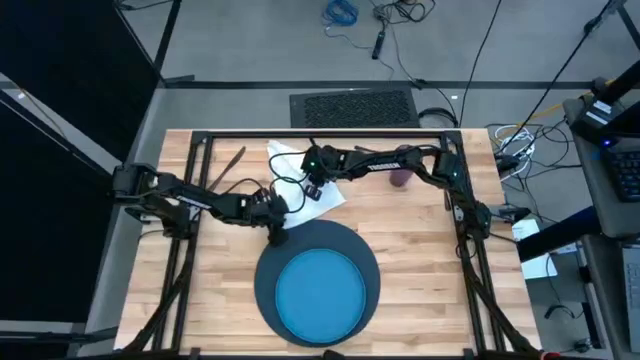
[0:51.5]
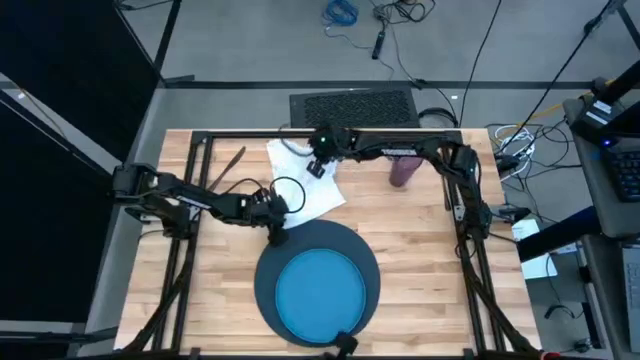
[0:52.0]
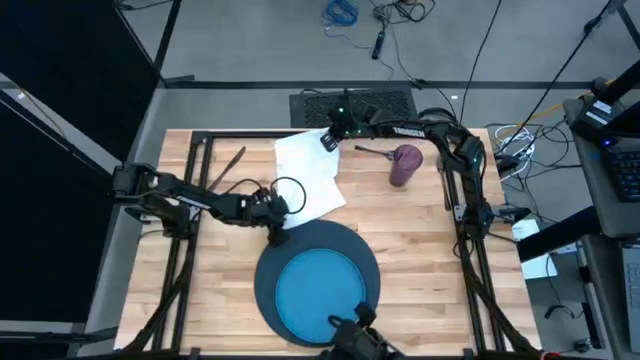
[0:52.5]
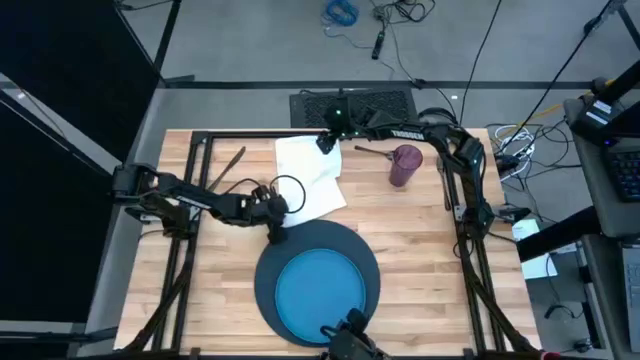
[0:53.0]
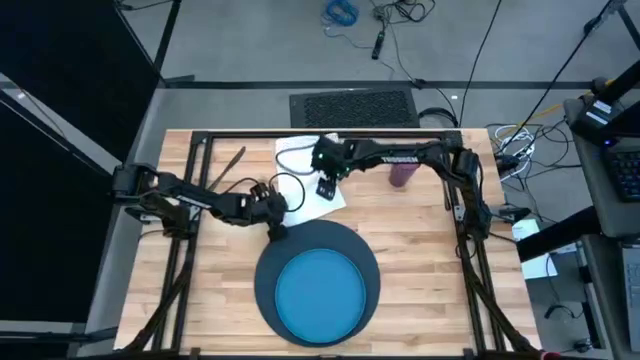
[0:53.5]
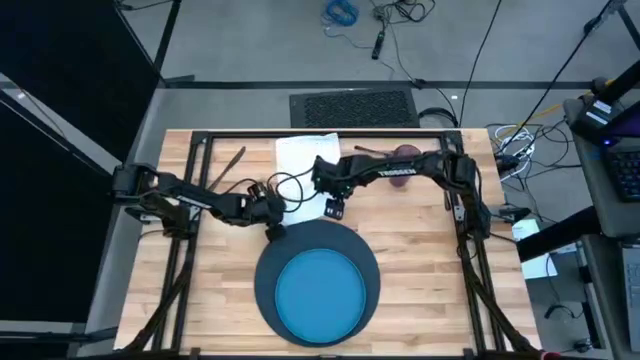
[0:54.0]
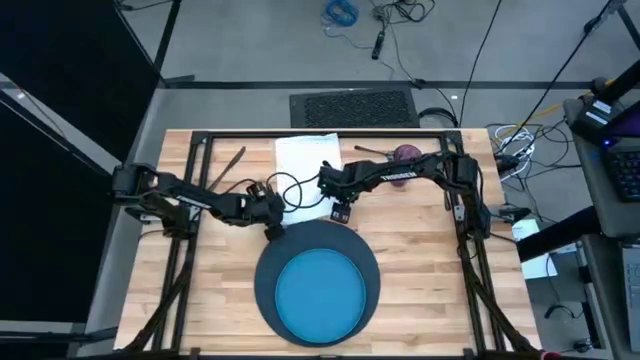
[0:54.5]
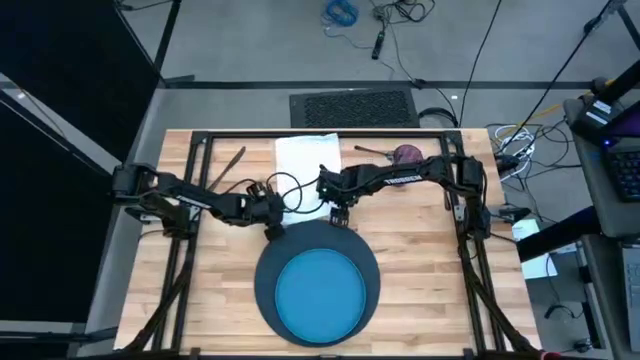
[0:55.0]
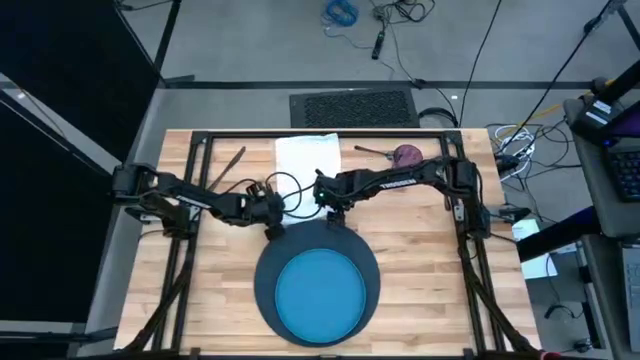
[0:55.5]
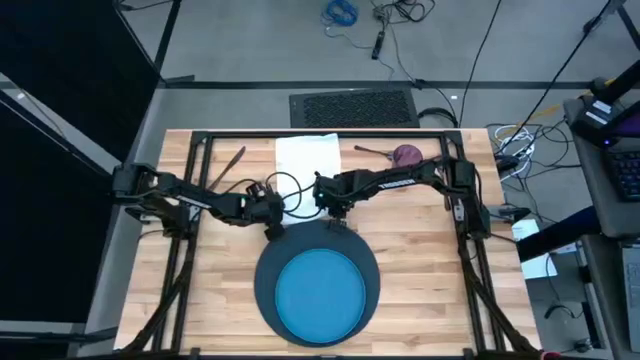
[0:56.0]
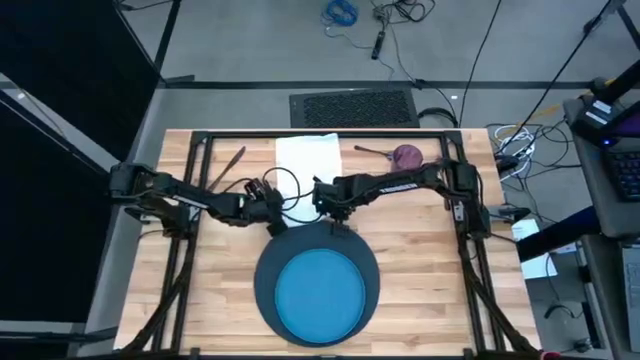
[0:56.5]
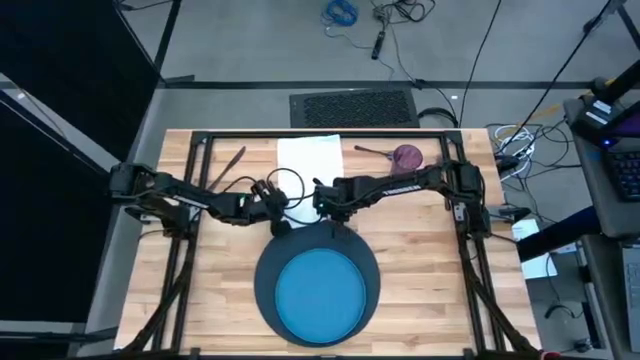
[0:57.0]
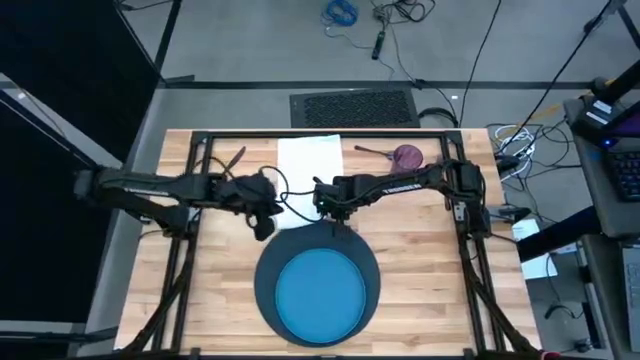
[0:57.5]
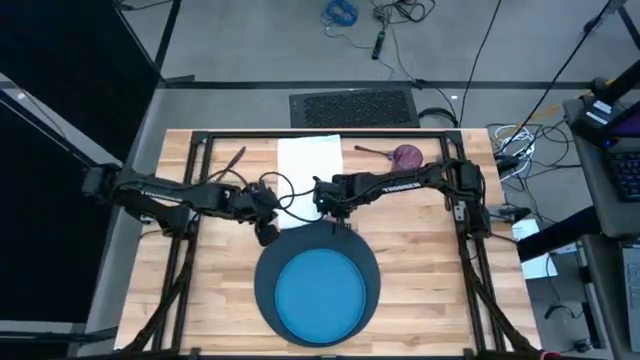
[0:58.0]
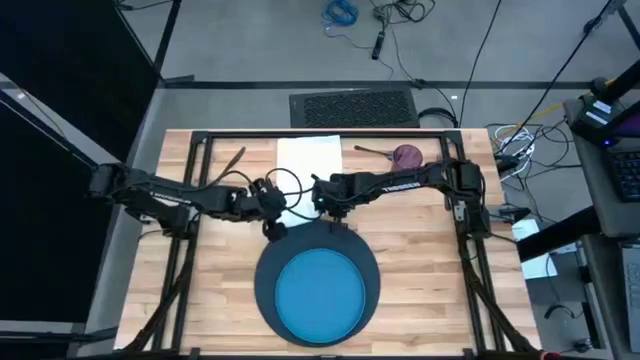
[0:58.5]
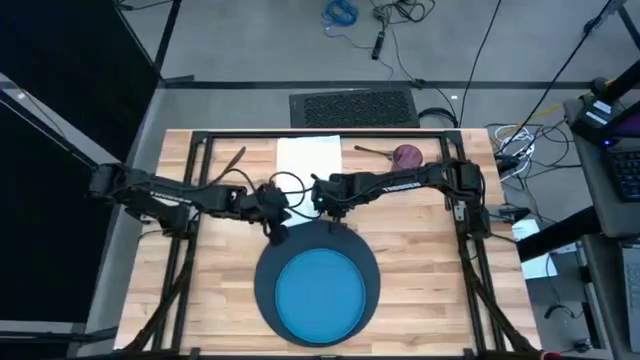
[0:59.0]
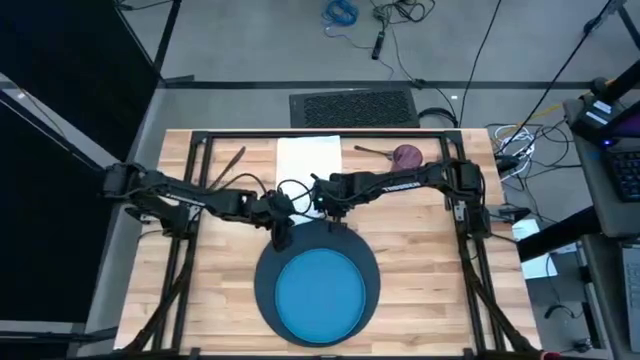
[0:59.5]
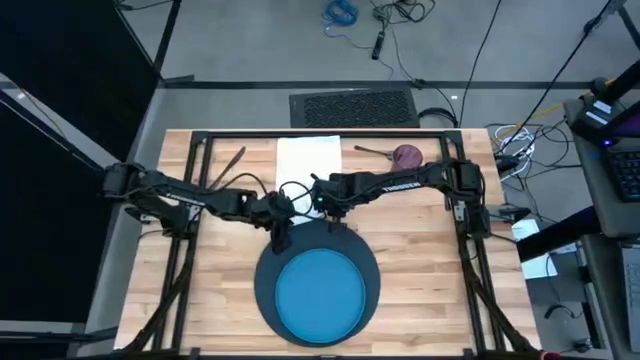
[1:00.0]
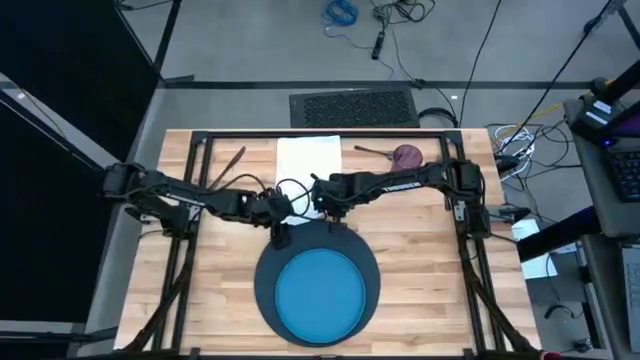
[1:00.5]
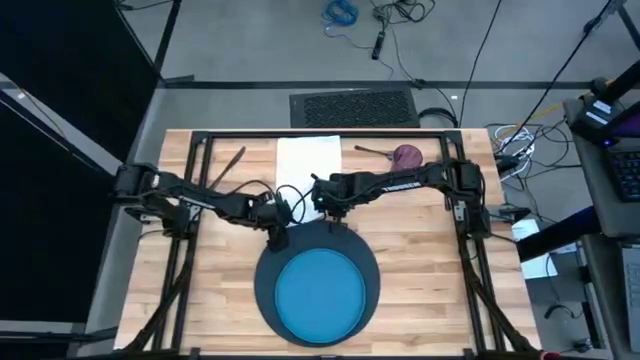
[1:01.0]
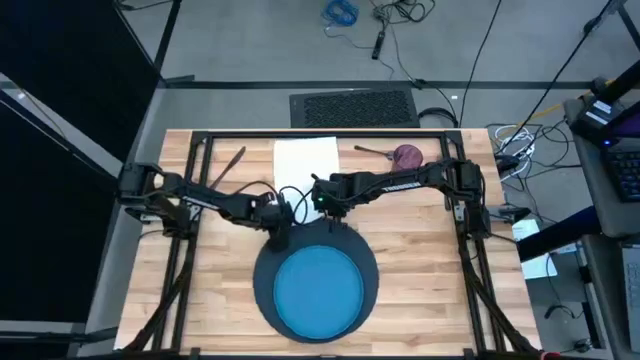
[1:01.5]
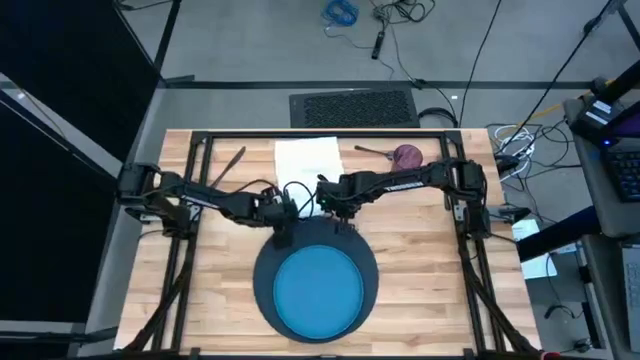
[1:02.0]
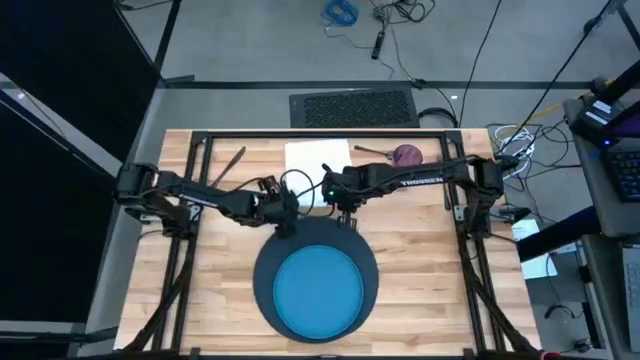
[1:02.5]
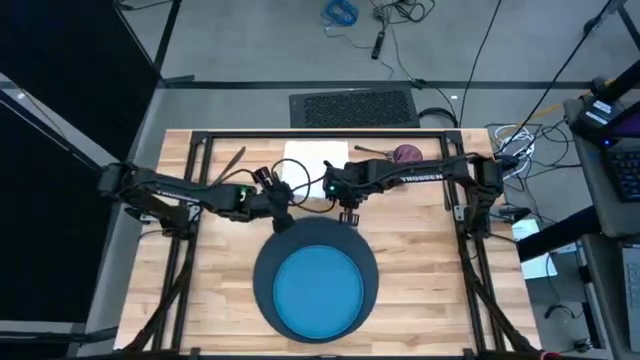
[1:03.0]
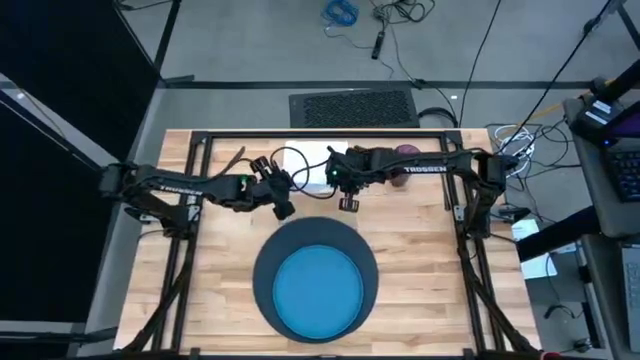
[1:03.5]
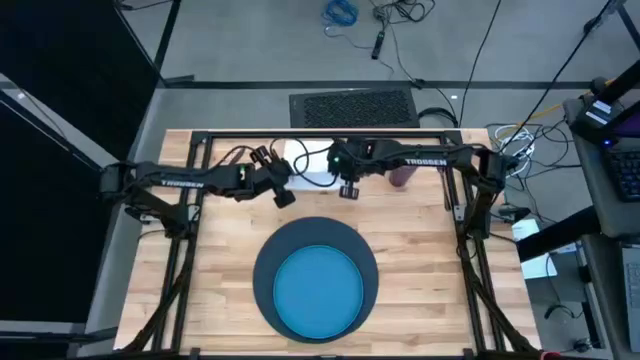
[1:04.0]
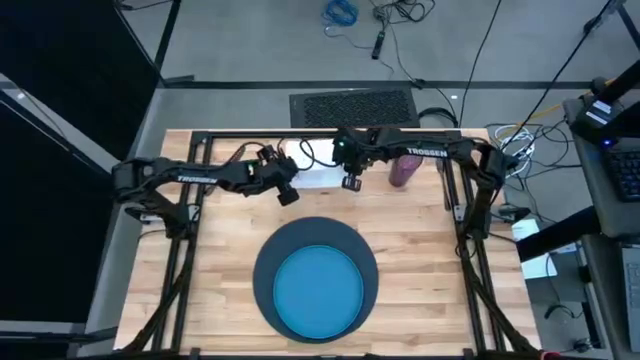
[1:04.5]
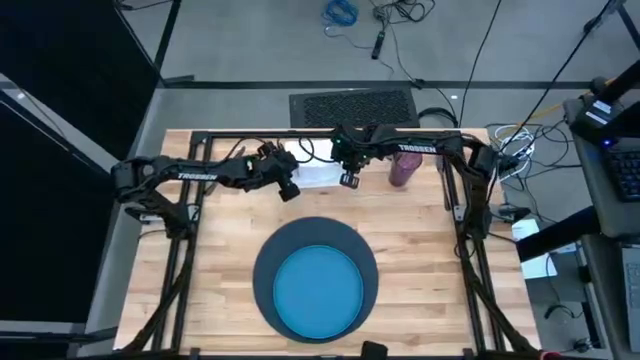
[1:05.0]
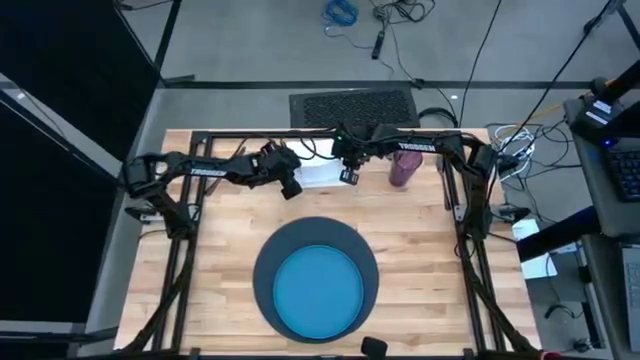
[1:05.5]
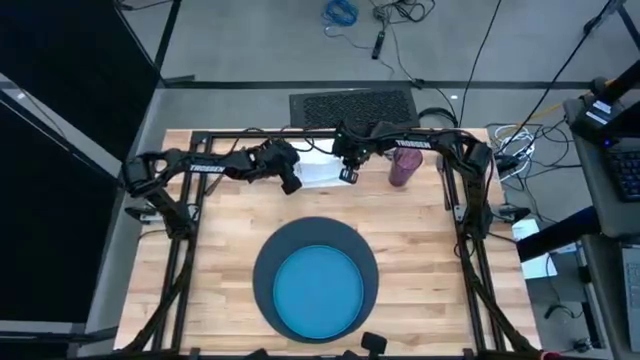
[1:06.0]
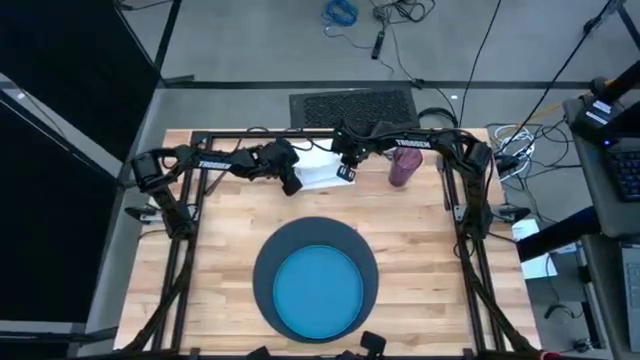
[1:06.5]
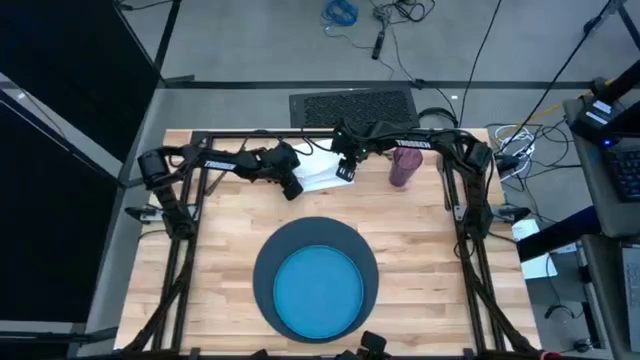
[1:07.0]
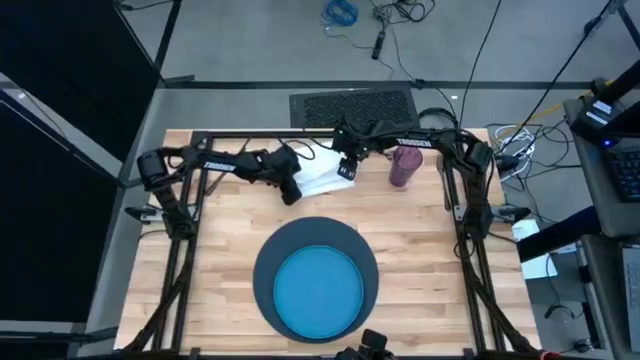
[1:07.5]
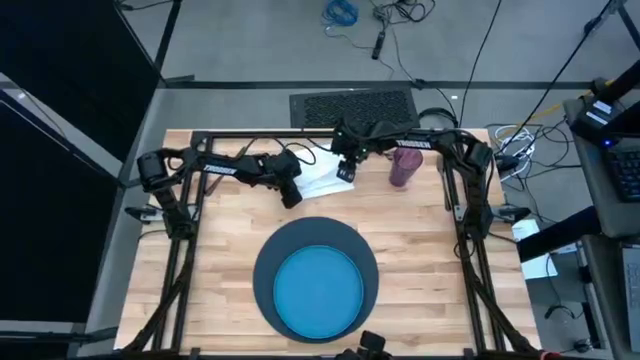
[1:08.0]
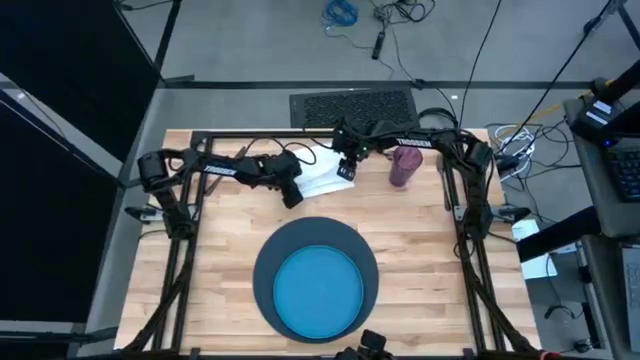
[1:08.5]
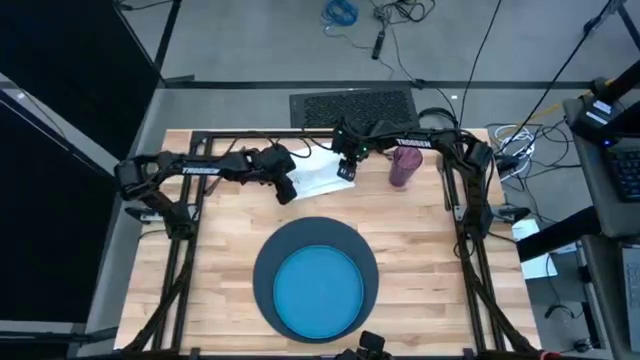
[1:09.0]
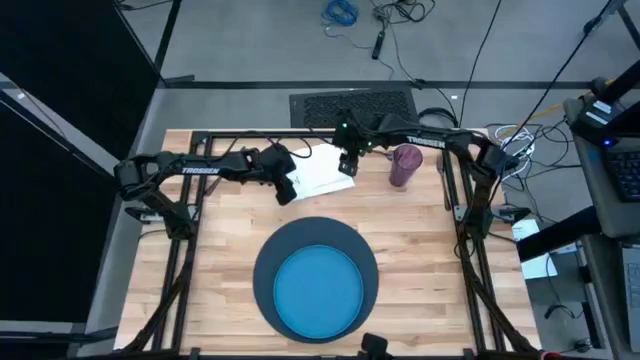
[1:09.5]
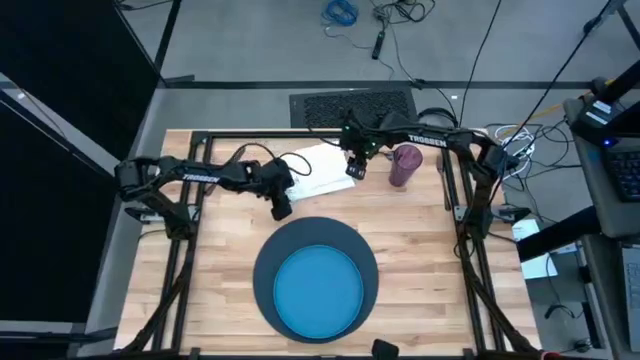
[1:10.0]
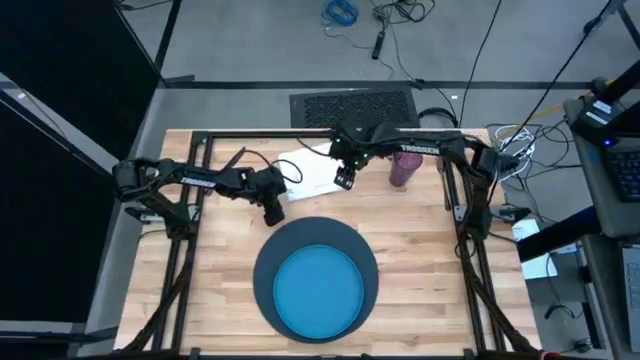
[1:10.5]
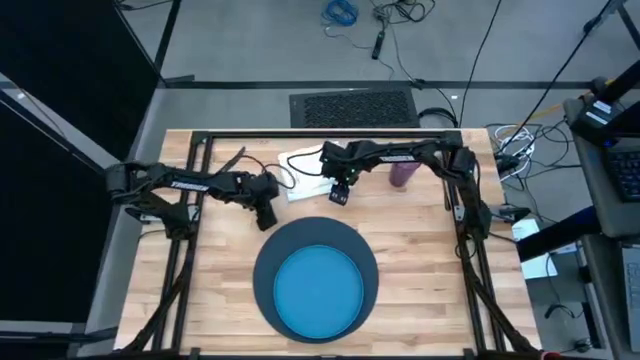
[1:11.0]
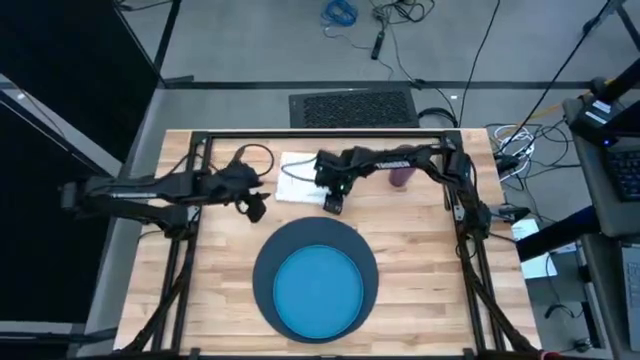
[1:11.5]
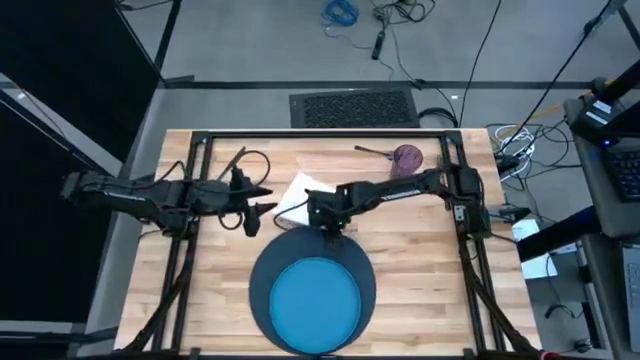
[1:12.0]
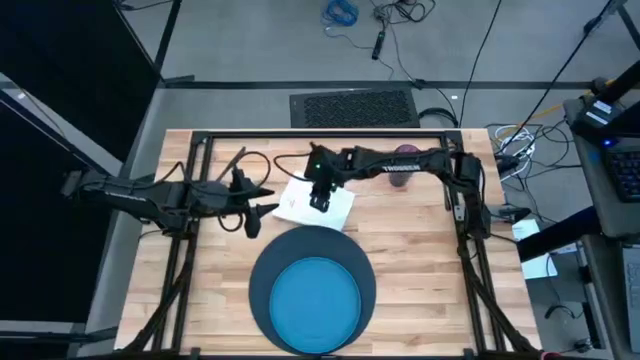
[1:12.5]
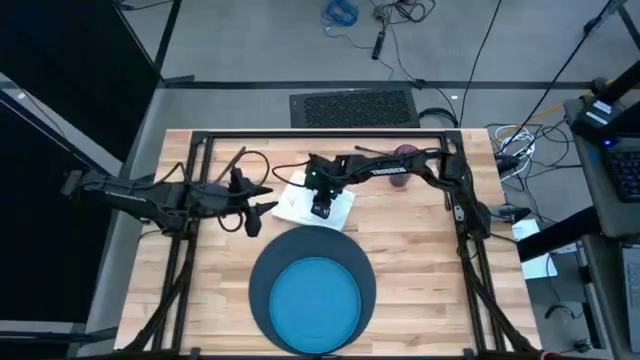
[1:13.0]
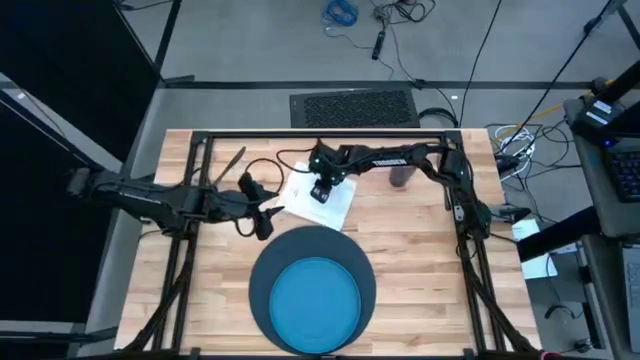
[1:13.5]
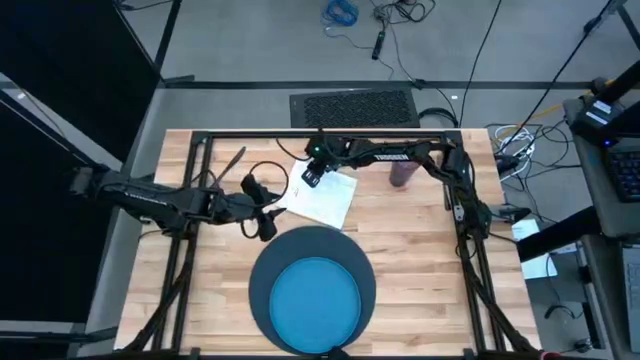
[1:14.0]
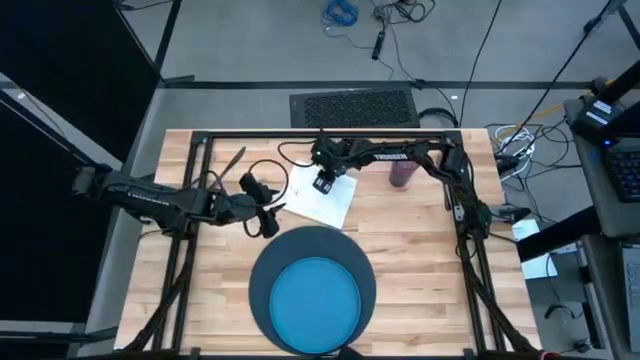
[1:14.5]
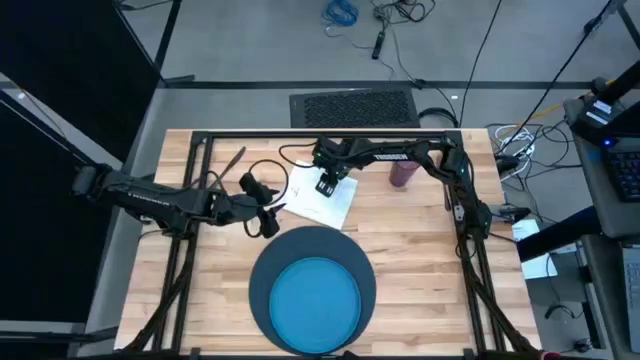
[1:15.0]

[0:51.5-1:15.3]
Task: Set table place
Fold the white napkin
